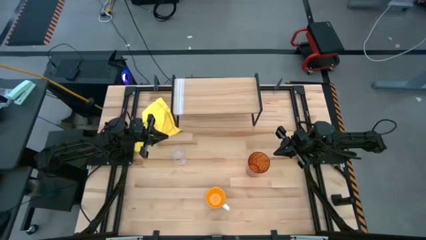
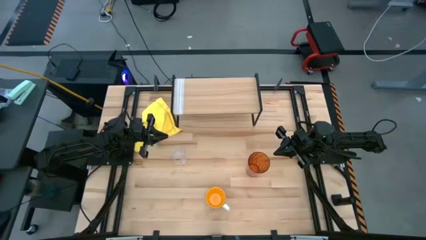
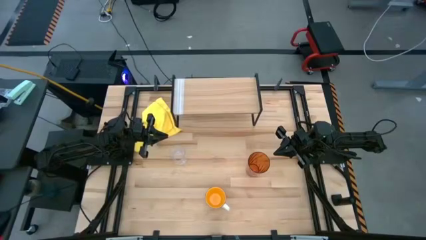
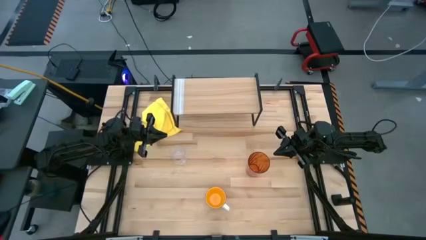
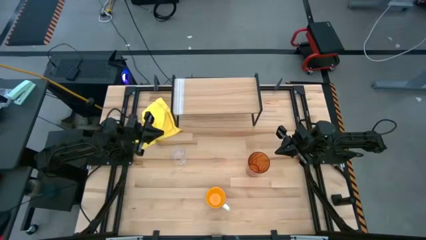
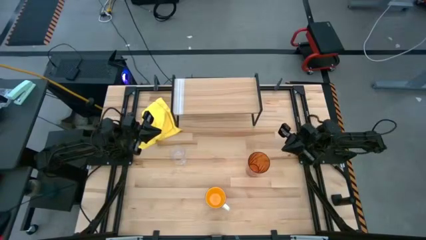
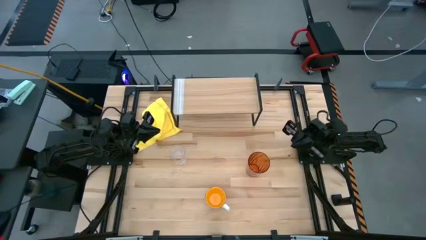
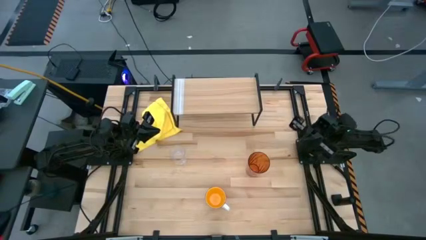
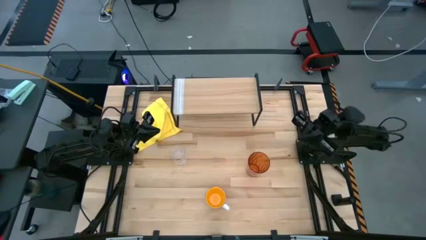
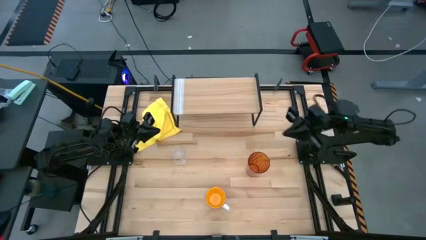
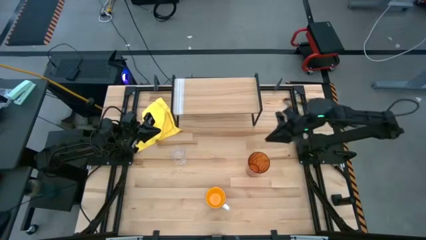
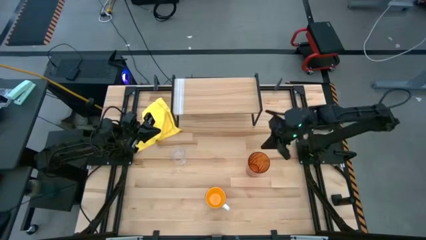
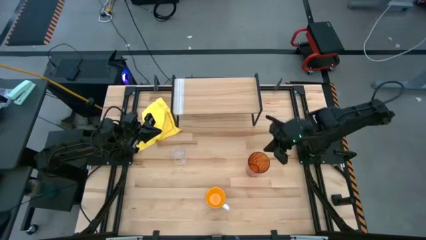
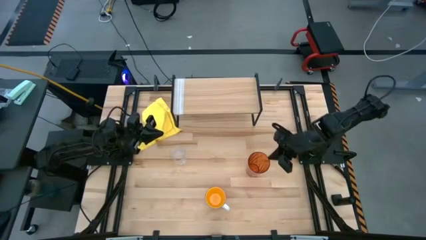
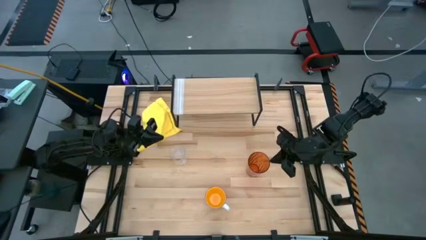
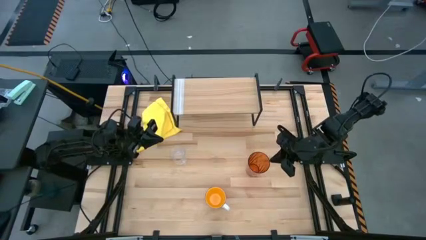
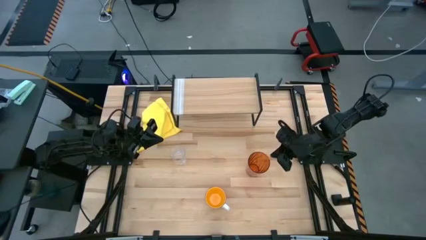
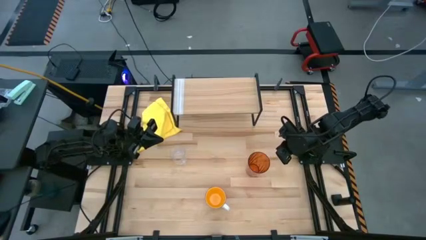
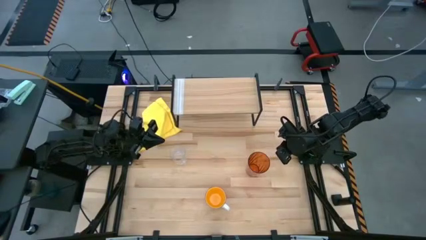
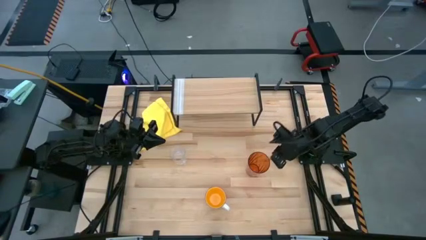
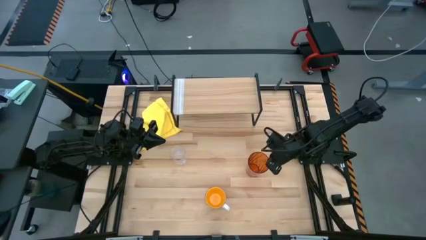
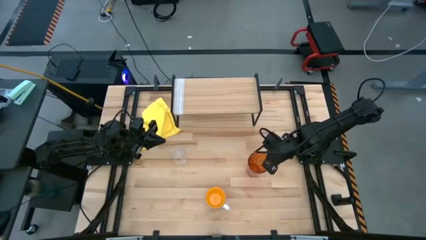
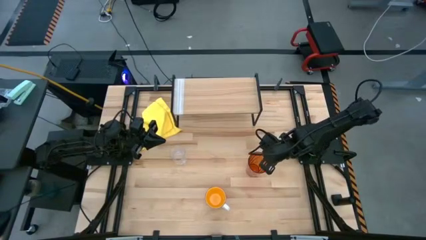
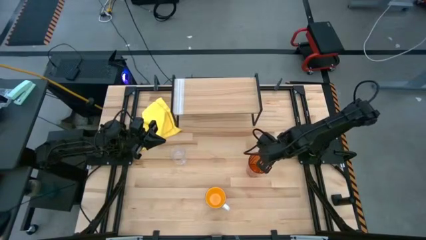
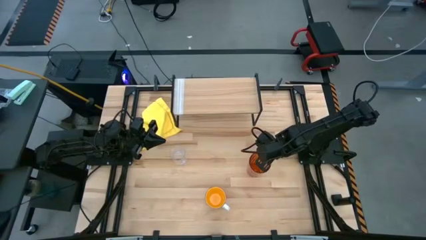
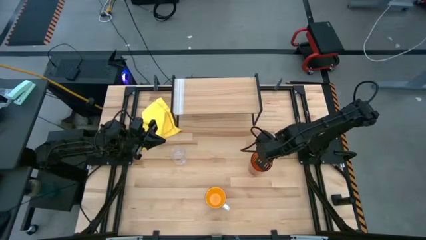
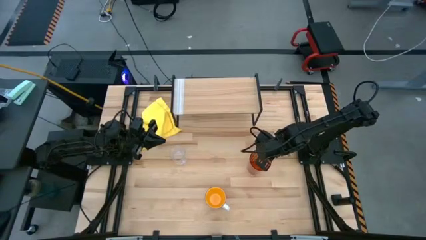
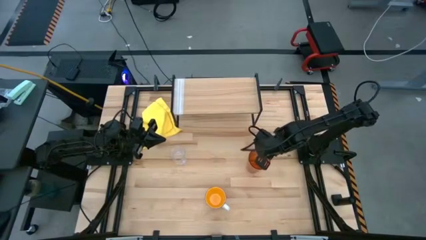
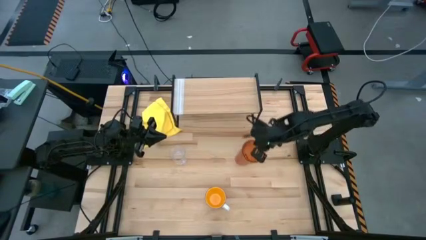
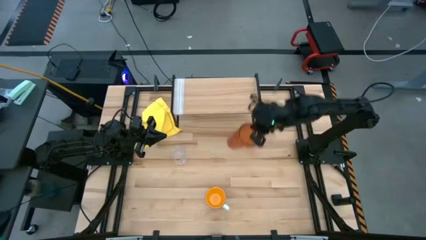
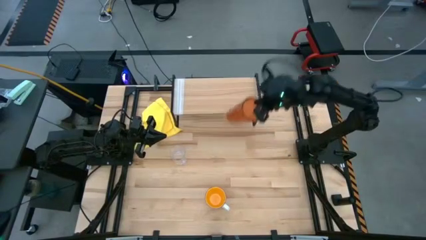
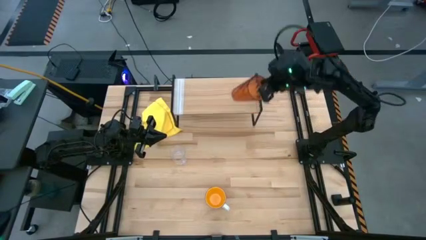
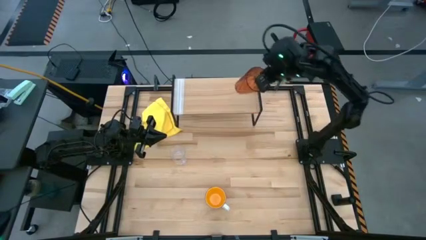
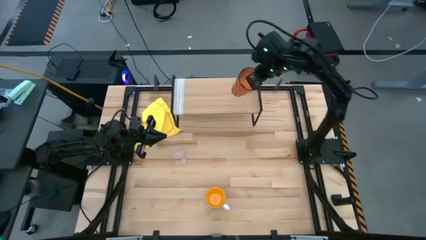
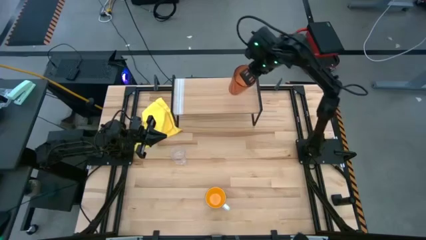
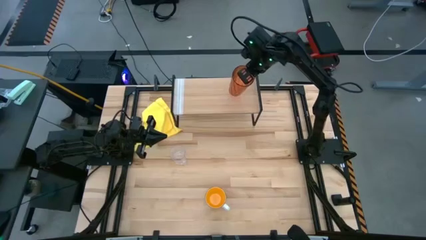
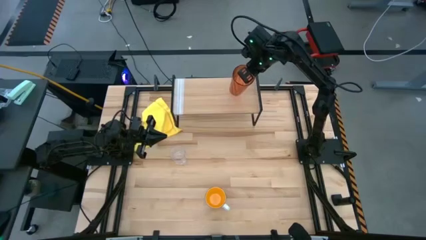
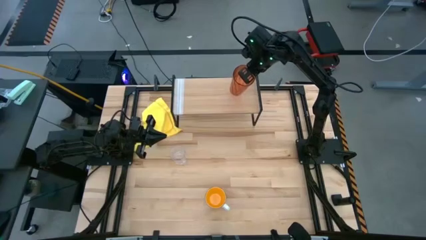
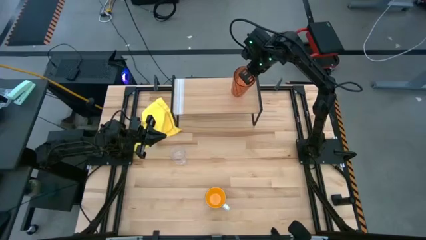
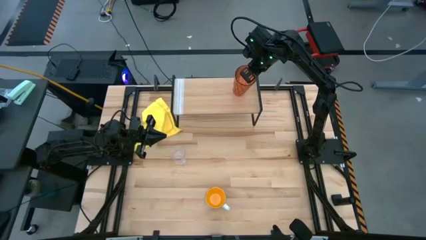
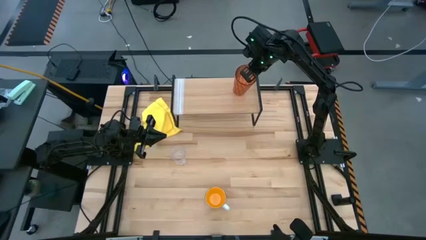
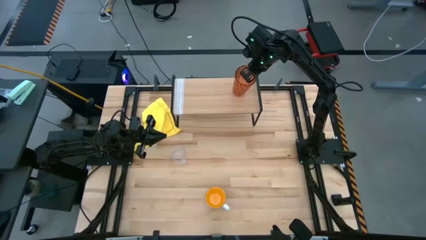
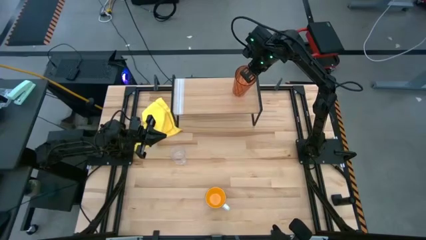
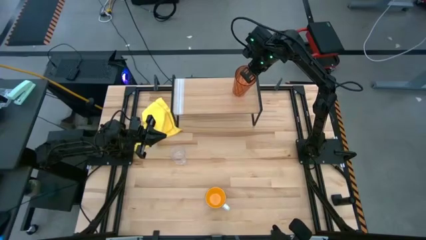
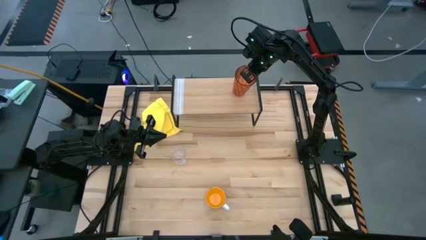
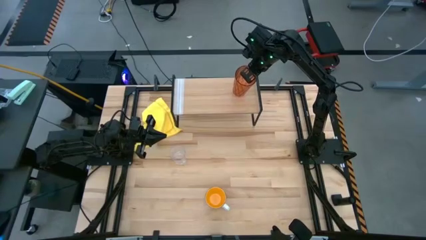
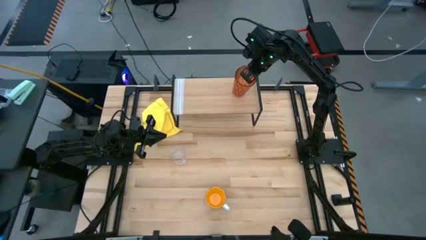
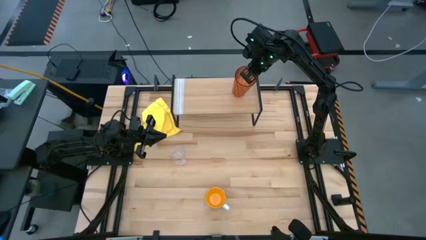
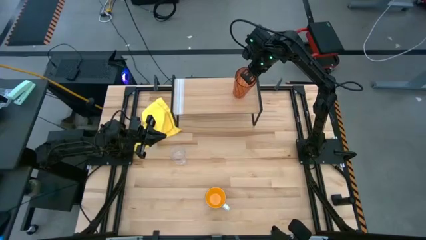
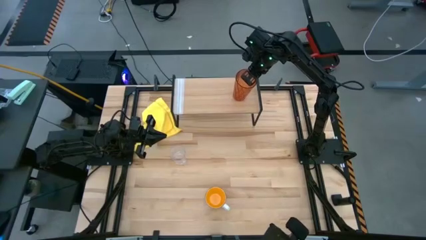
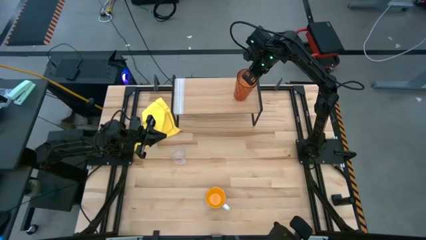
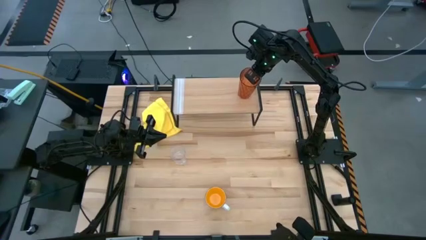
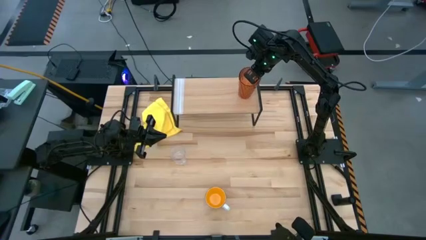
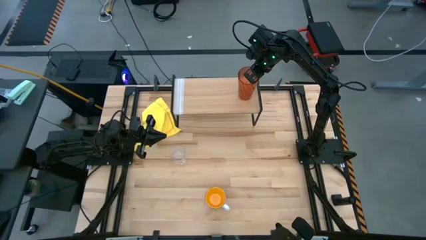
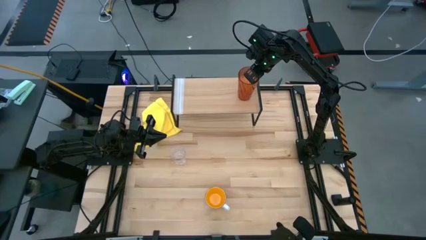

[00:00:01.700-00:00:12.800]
Task: Stack small to large cups/mugs on shelf
Put the brown glass on the shelf
